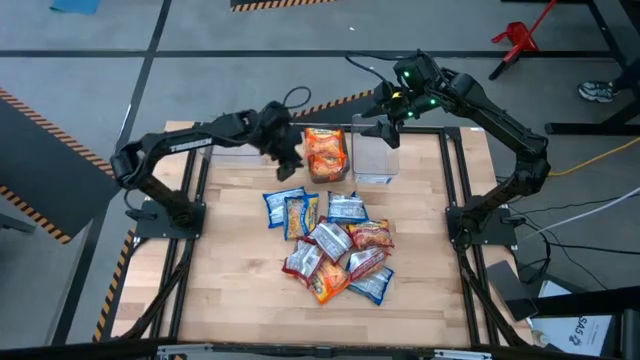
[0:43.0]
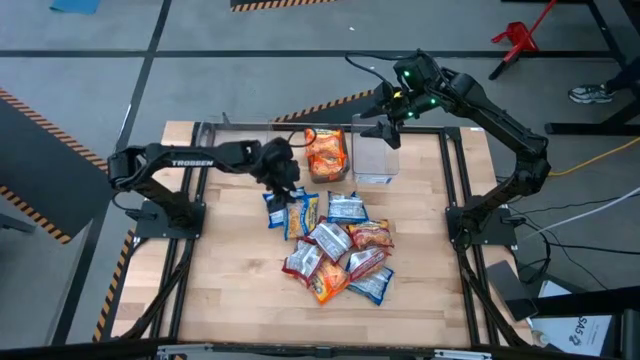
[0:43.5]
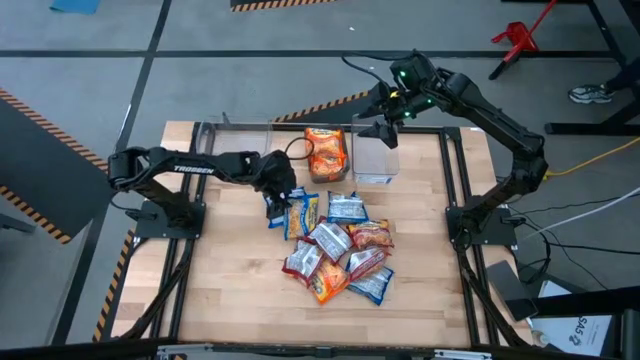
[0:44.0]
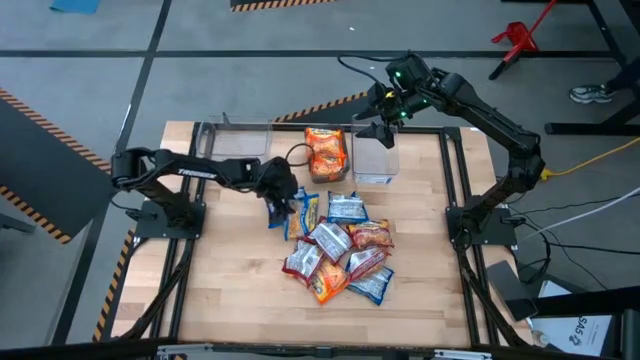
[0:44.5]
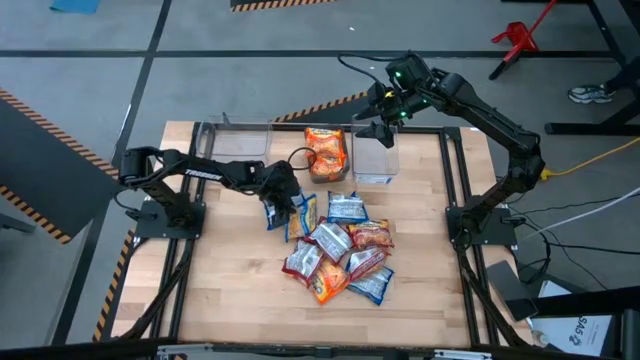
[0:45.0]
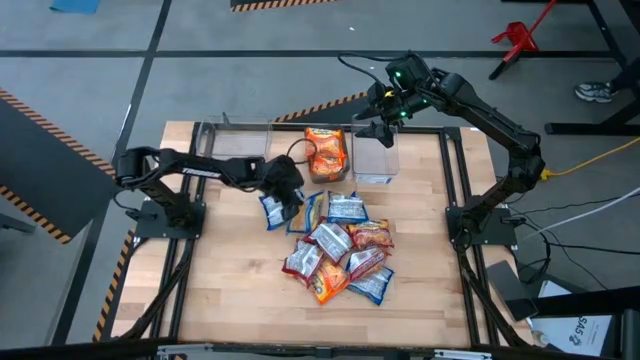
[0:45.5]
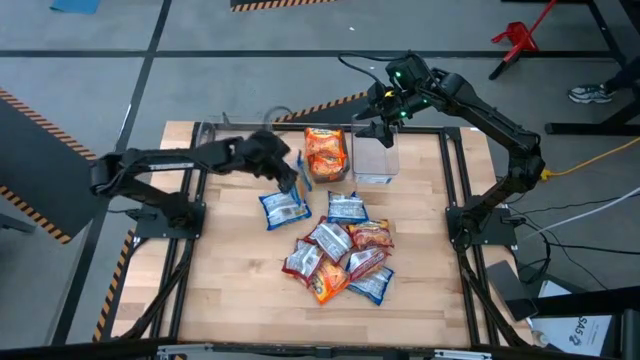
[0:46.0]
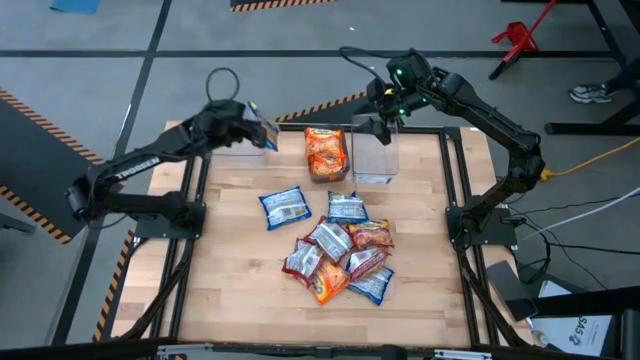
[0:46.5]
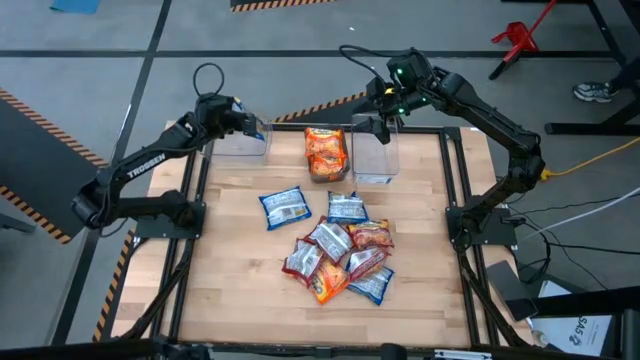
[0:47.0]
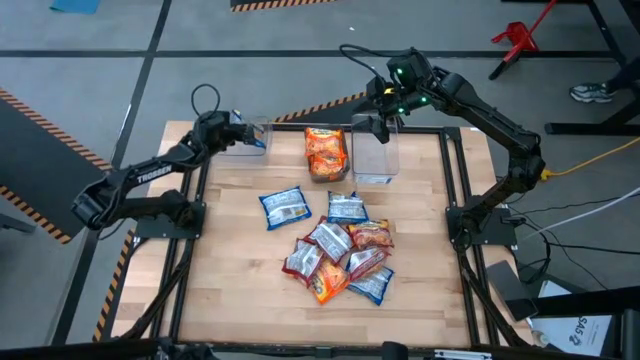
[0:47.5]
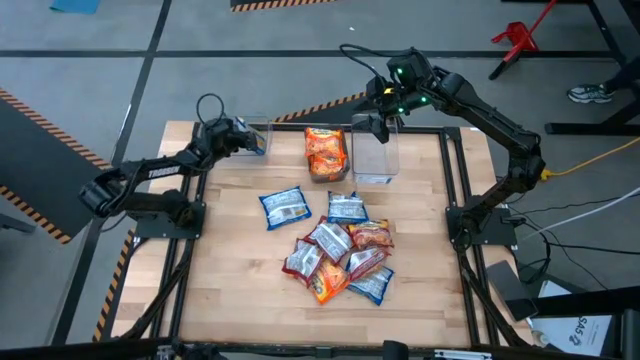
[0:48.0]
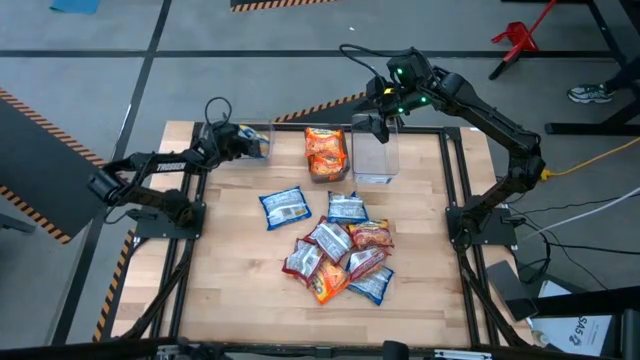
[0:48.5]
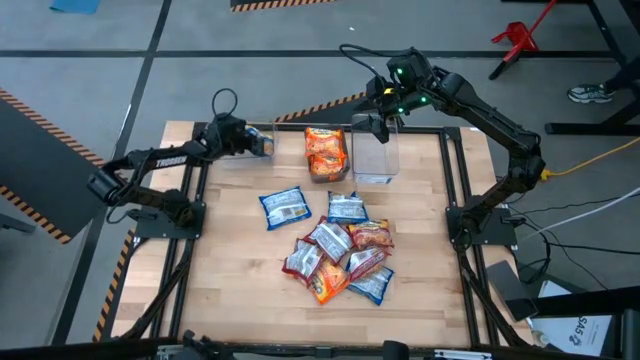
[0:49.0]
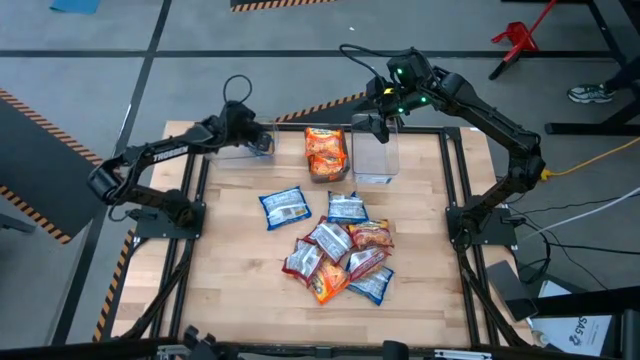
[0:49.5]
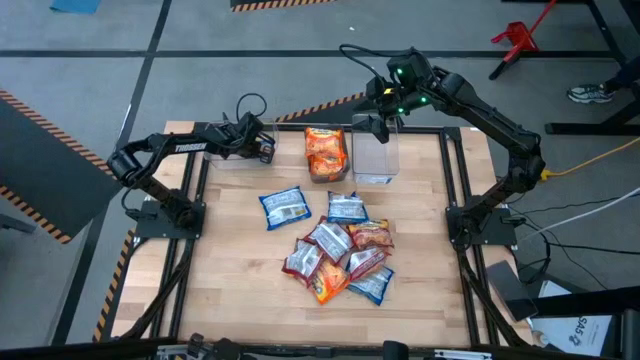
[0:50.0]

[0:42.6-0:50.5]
Task: Sort Maruchan noodles
Put the blue noodle pack into the left transparent bin

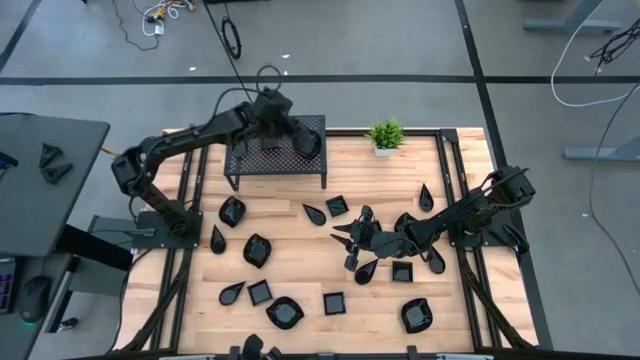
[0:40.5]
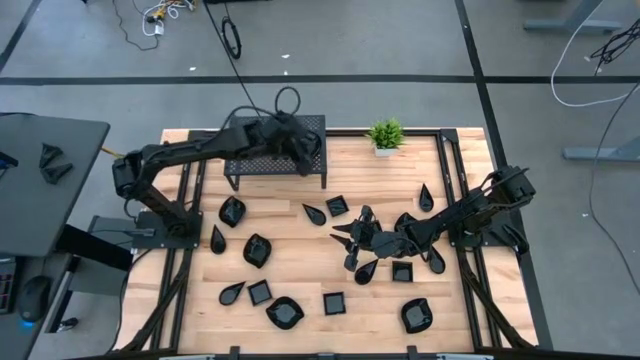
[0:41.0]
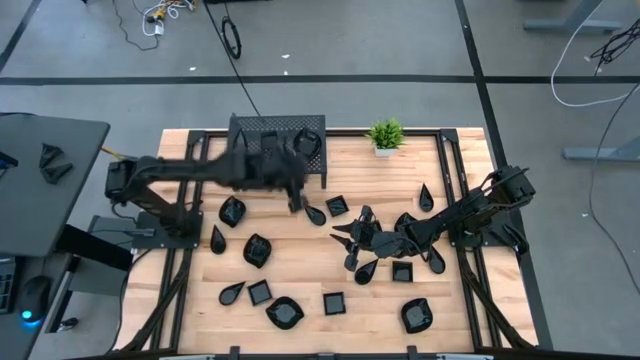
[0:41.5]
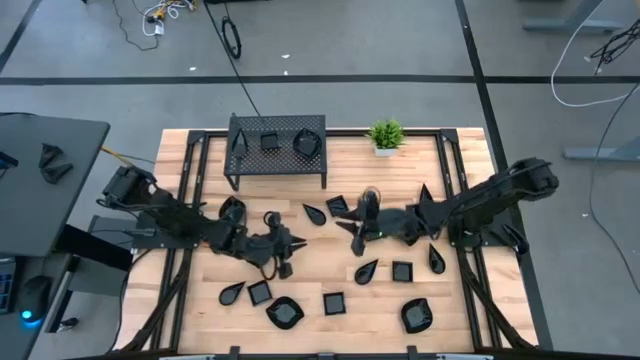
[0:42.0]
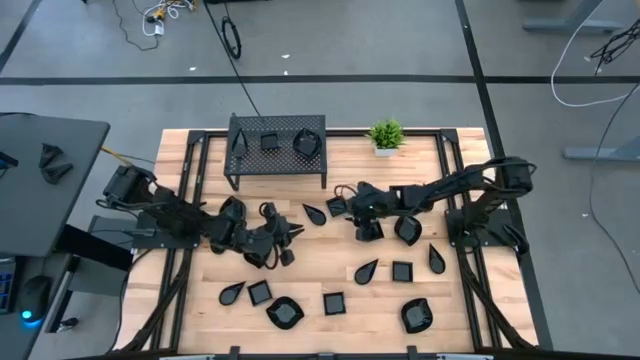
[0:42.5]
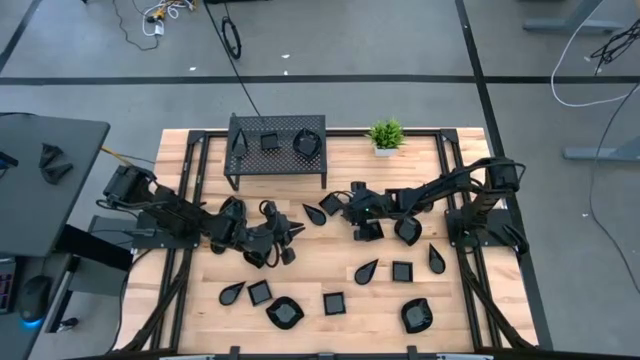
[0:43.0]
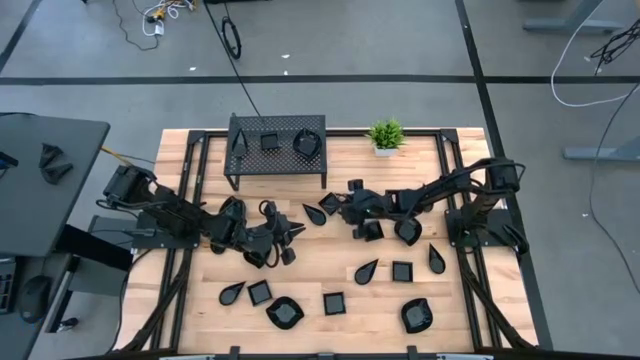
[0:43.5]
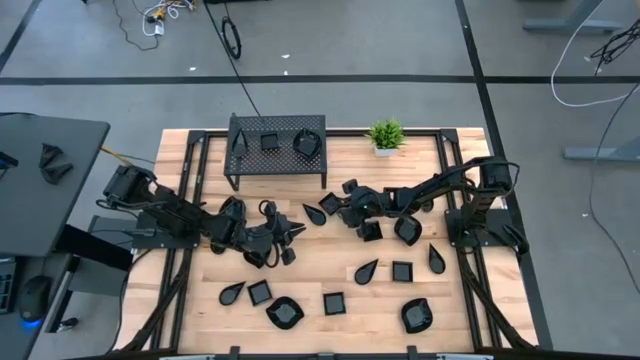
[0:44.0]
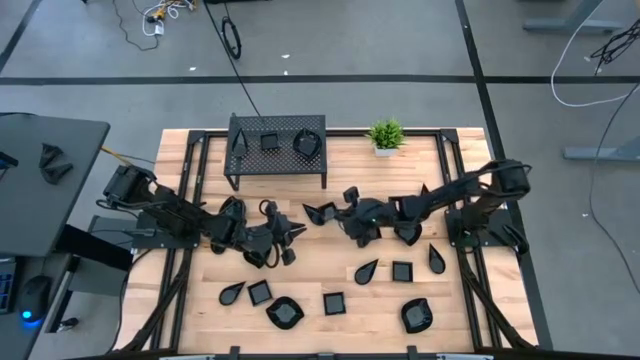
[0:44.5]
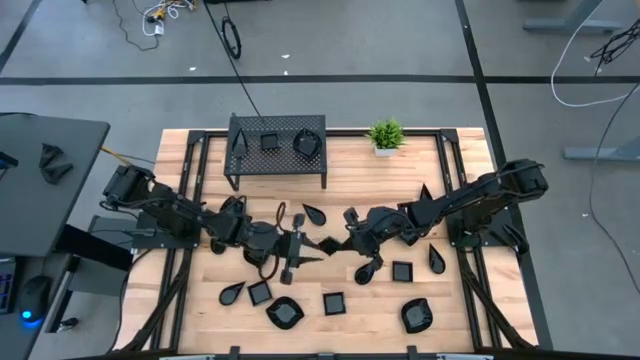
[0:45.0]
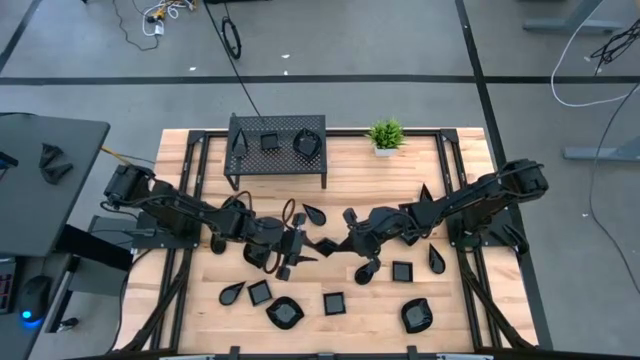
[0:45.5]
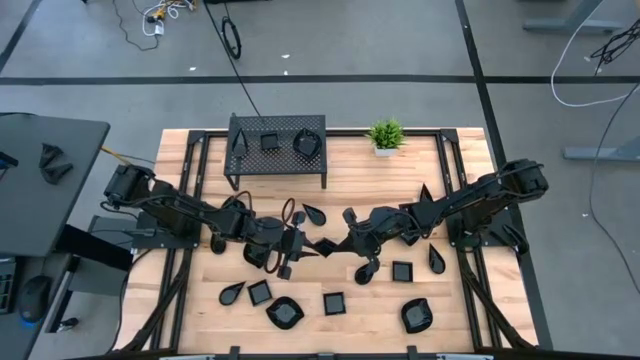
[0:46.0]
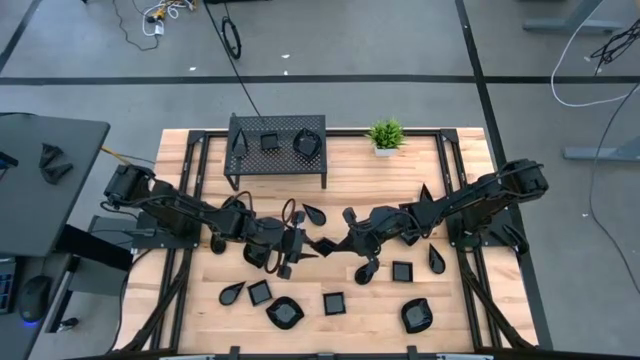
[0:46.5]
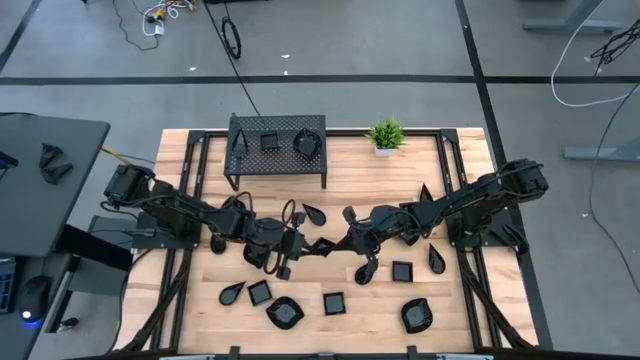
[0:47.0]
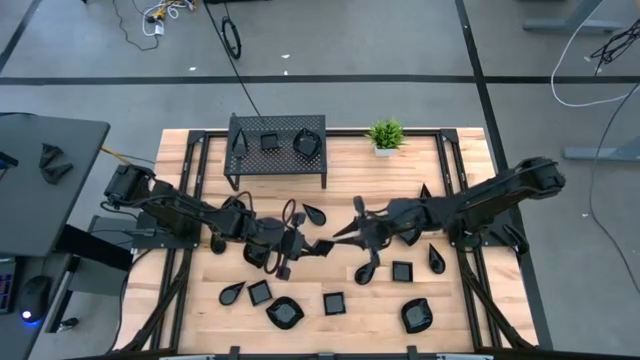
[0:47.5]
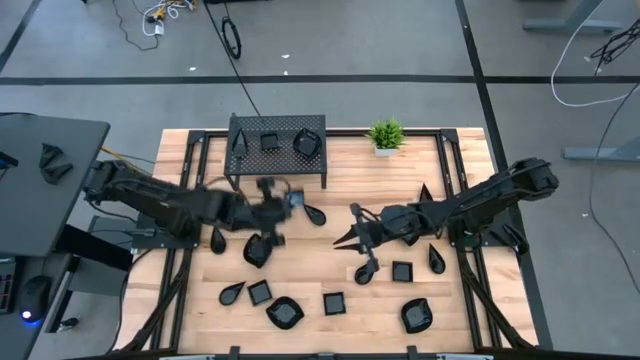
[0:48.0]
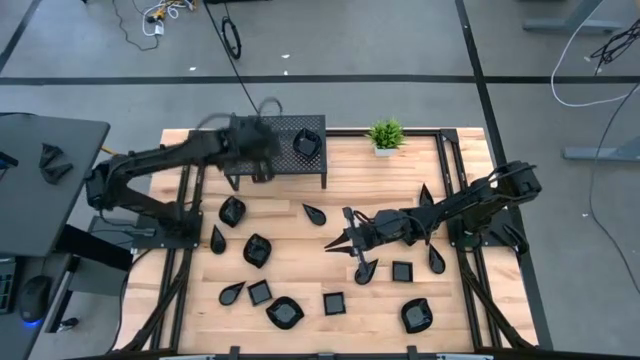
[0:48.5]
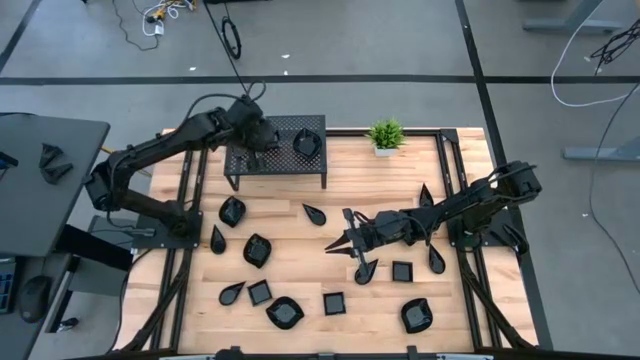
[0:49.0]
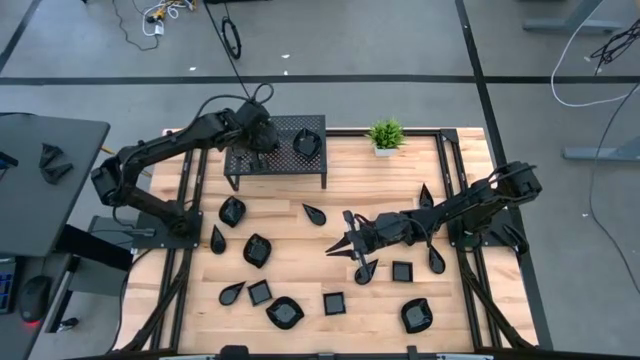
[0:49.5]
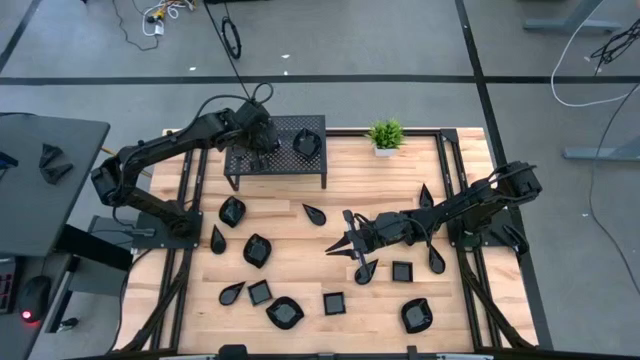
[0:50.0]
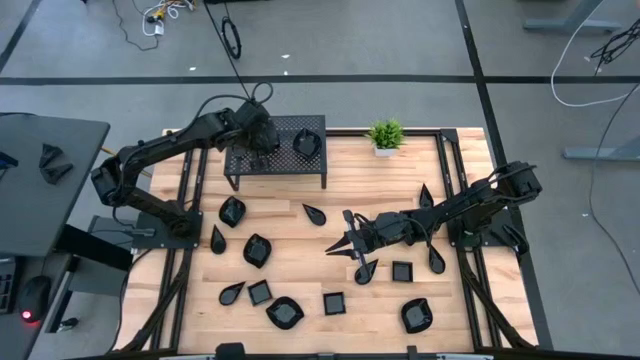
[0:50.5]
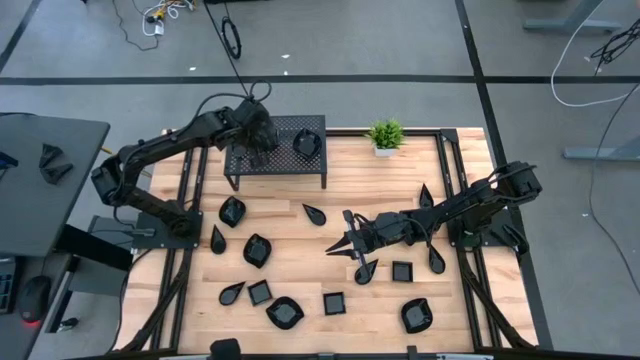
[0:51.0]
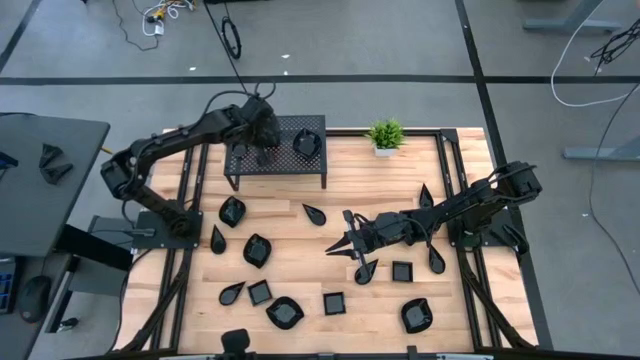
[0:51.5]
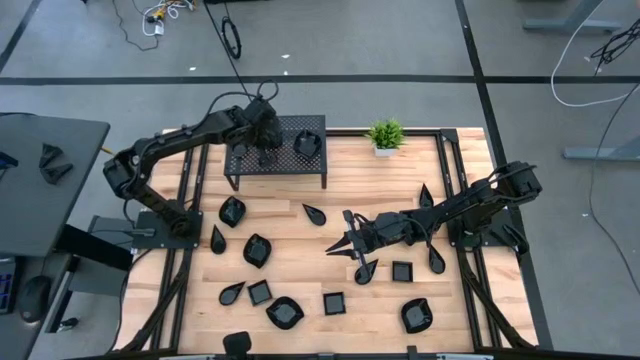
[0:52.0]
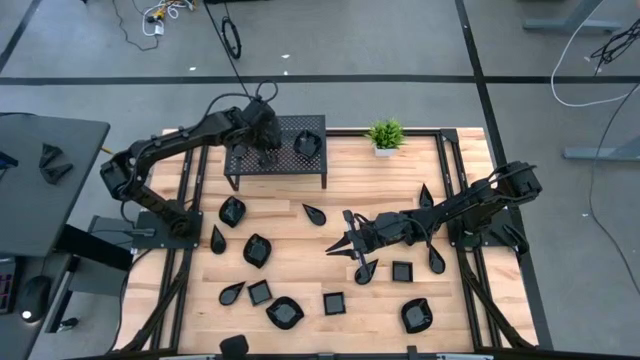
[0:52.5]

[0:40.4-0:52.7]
Task: Pick & Place Mini shaped plates
Stack the black square plate on top of the black square plates on the shelf
